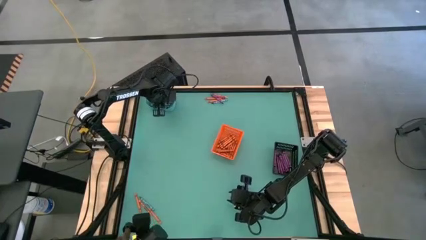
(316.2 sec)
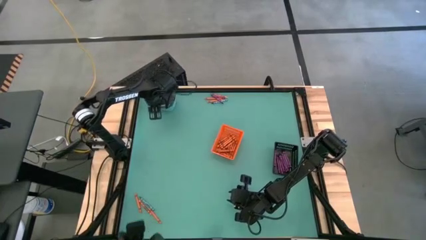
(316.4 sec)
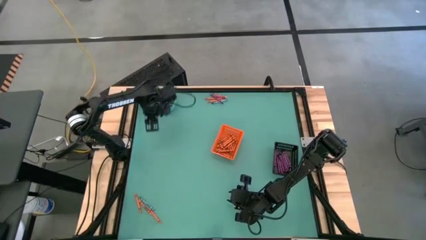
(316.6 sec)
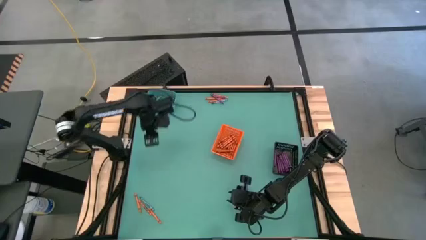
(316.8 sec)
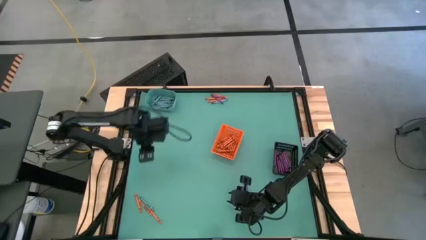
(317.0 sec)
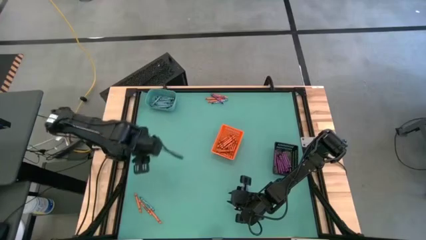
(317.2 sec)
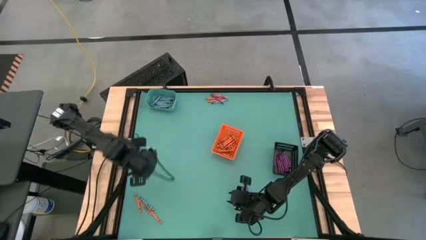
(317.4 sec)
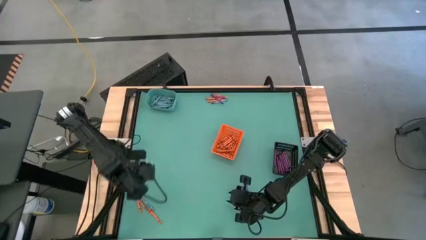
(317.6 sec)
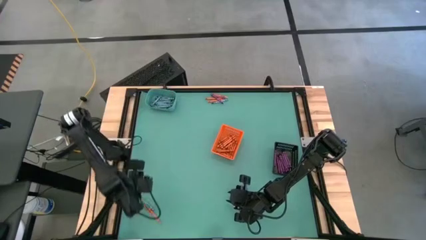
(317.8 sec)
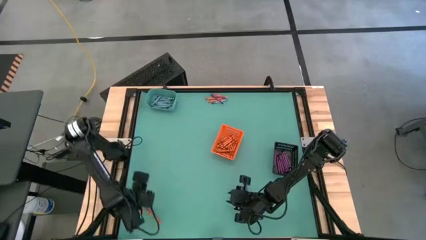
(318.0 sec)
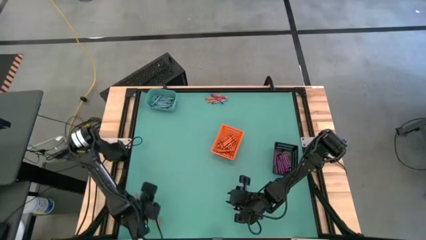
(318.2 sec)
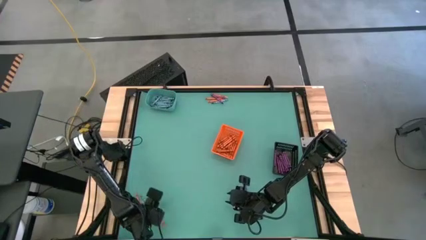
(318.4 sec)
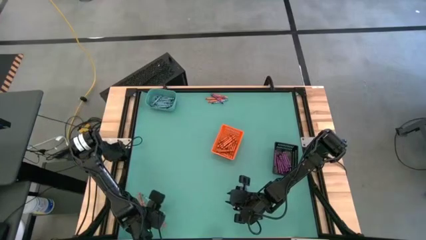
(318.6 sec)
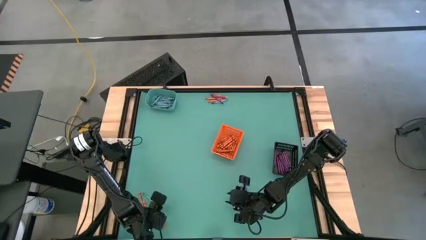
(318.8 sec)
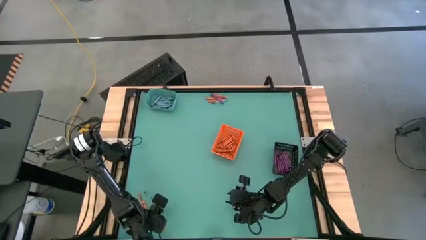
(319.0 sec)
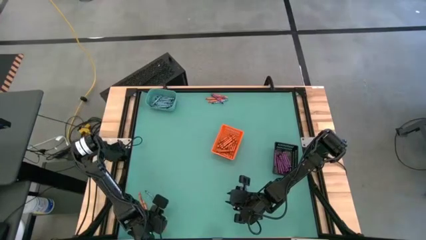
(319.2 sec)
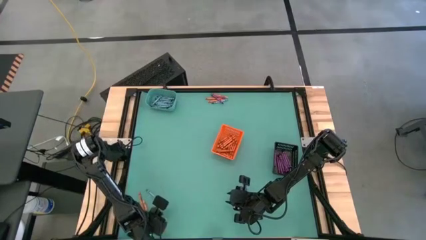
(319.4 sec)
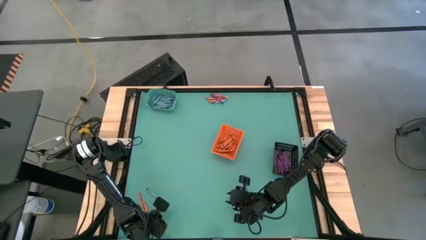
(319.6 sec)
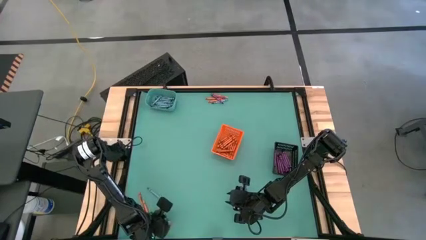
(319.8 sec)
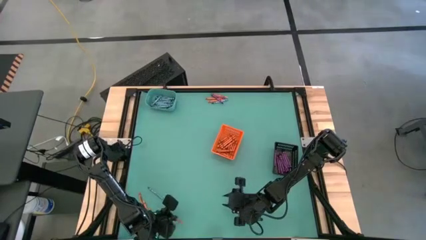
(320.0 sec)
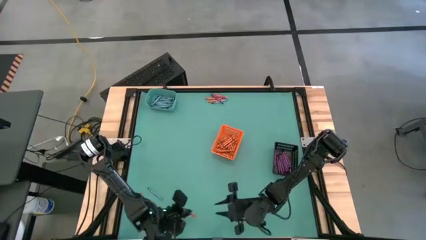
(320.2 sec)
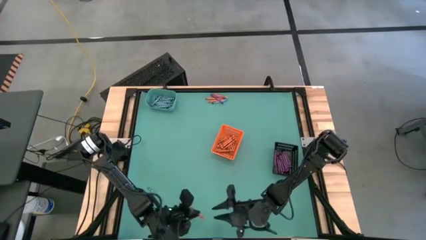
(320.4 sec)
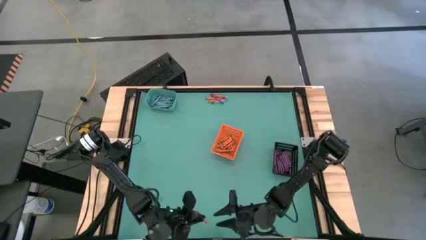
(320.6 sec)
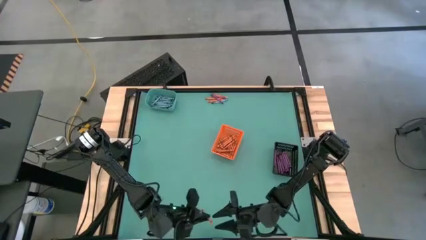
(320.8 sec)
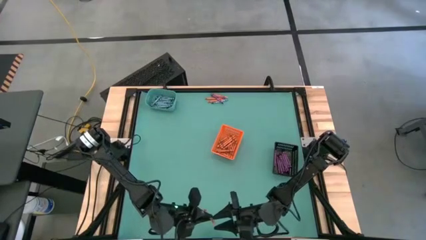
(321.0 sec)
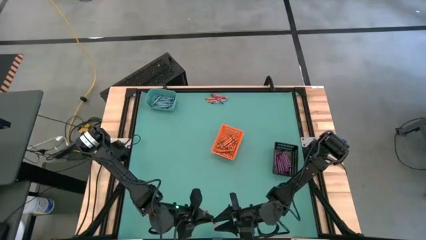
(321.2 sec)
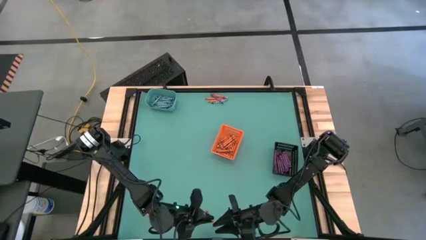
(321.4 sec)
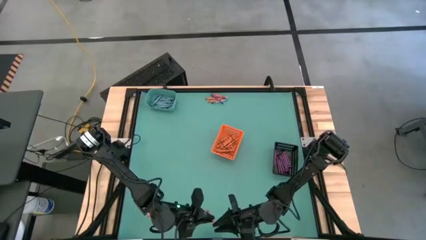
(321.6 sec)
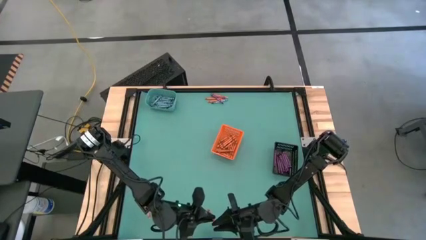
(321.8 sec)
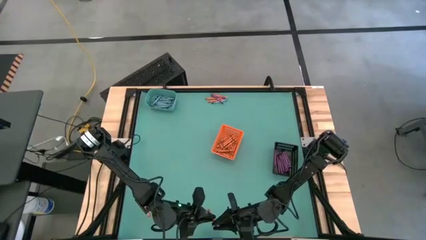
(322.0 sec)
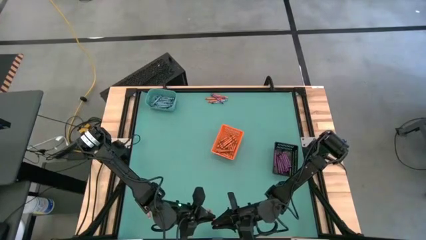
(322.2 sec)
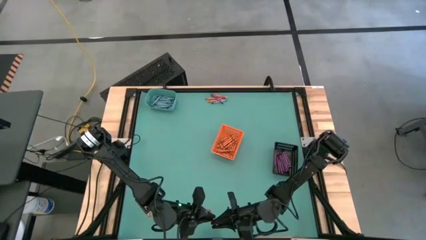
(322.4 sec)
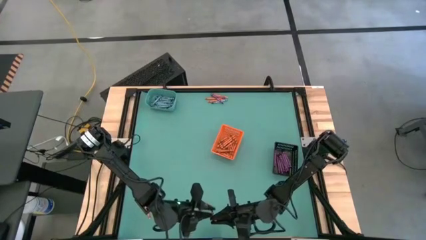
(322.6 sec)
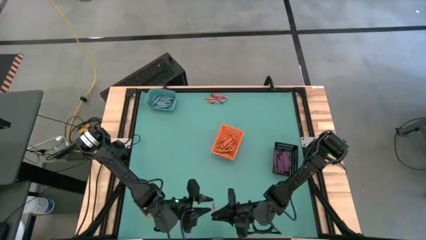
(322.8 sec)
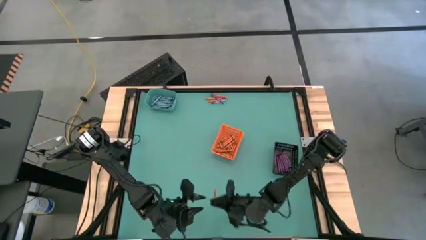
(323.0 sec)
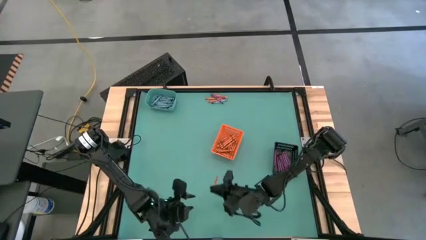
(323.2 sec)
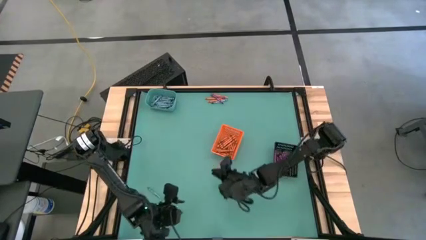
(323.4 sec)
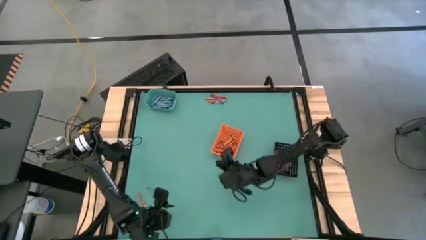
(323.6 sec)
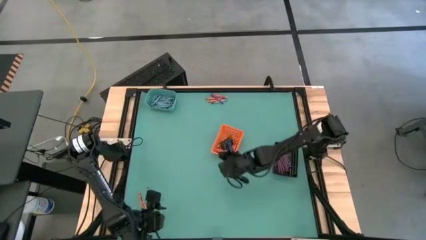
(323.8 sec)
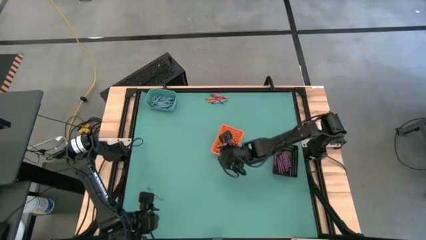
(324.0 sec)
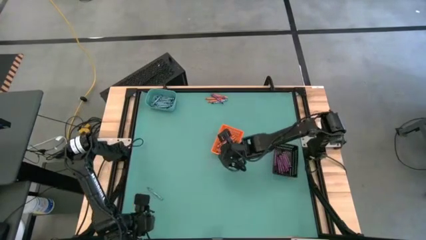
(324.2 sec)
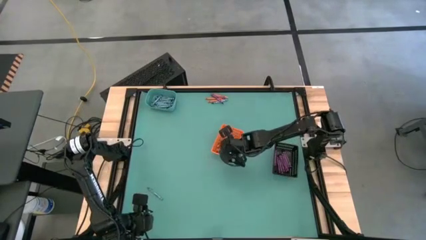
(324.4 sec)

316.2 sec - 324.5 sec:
Task: Sort crayons
Put the orange crayon into the orange bin

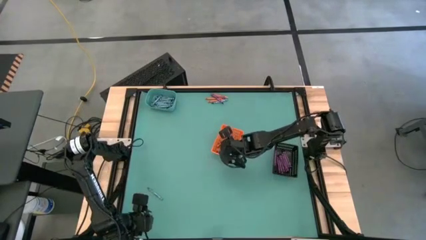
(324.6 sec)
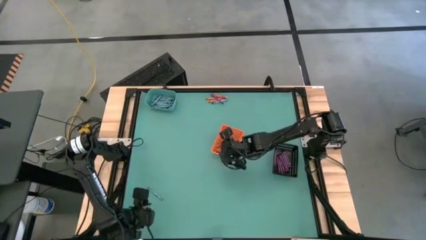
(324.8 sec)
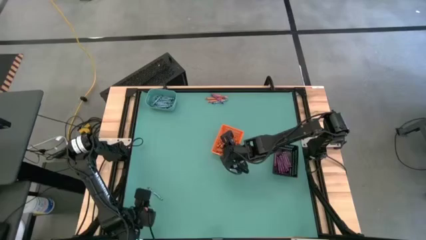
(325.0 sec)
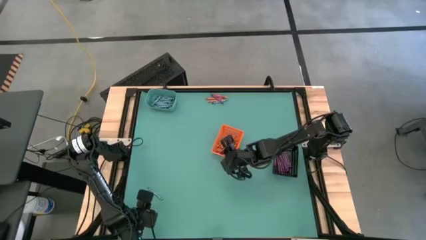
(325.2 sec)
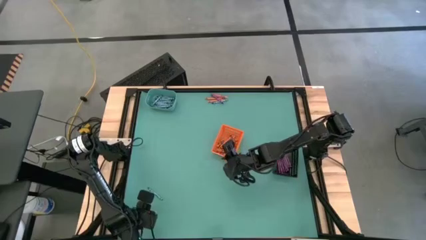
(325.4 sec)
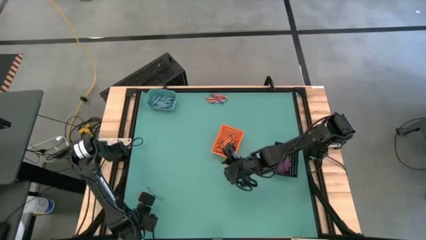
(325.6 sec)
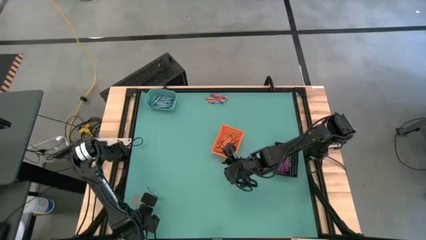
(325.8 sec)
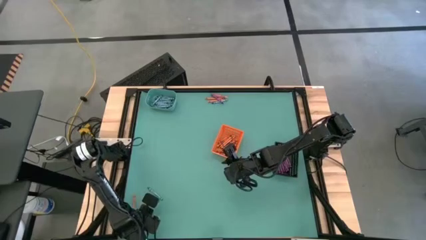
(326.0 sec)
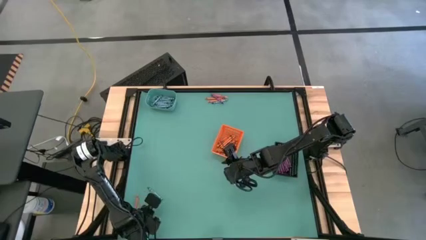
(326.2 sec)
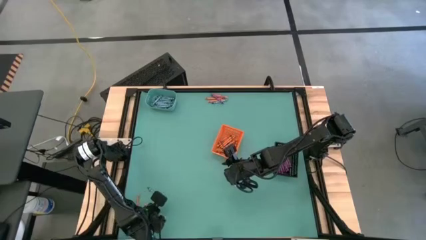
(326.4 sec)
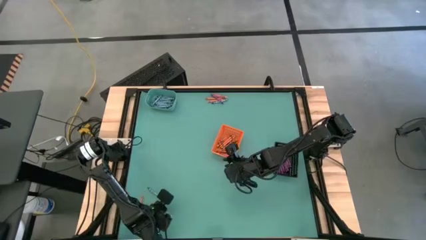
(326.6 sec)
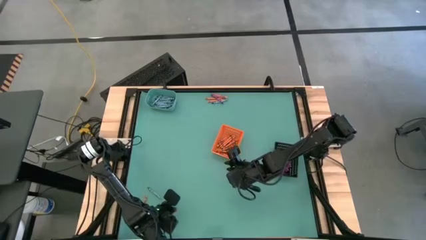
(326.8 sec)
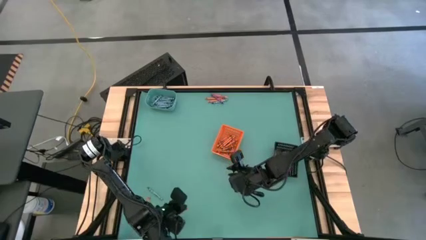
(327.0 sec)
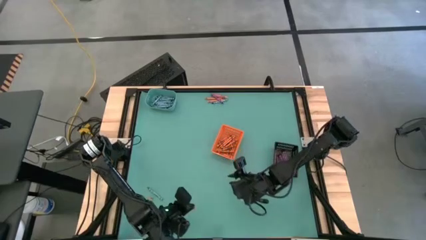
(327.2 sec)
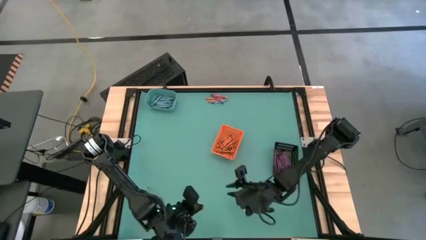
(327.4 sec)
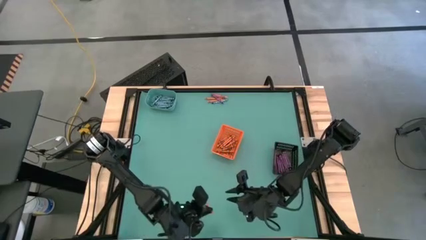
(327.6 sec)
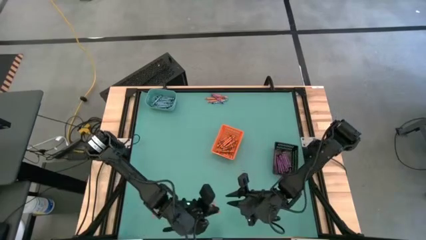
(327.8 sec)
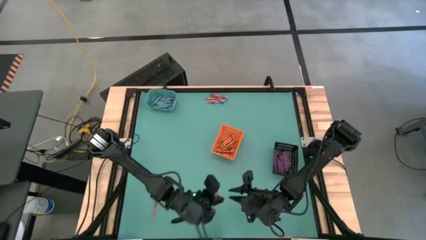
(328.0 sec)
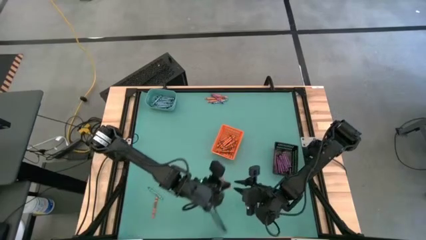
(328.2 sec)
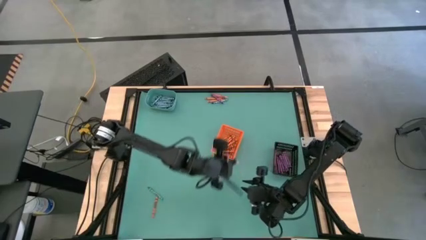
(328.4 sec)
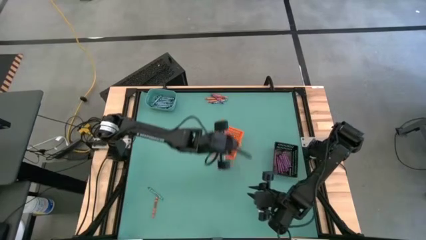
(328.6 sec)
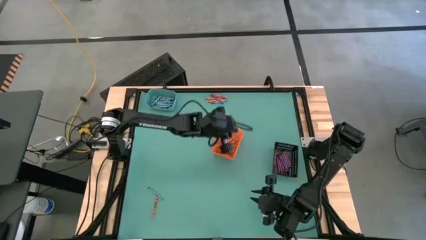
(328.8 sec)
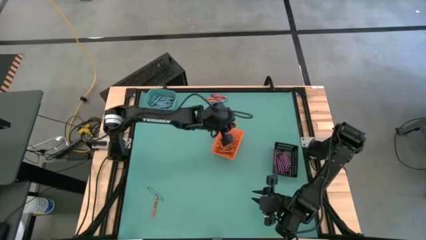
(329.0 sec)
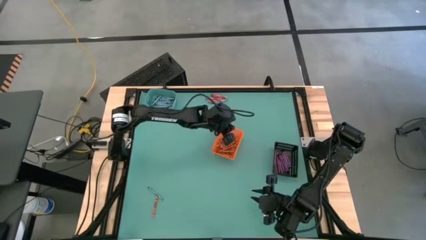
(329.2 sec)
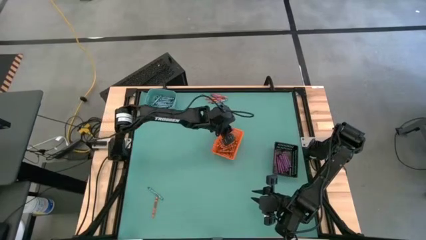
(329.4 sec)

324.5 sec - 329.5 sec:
Put the orange crayon into the orange bin

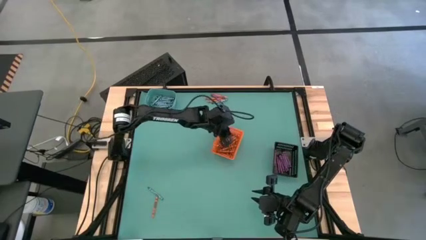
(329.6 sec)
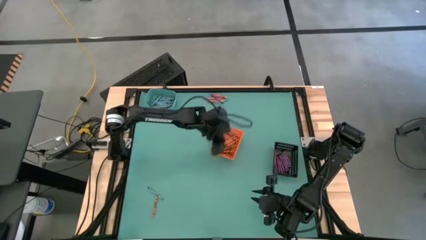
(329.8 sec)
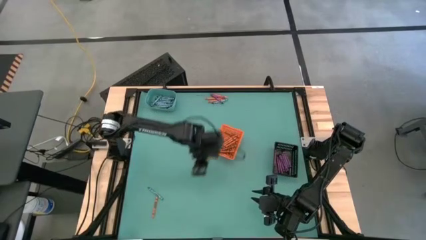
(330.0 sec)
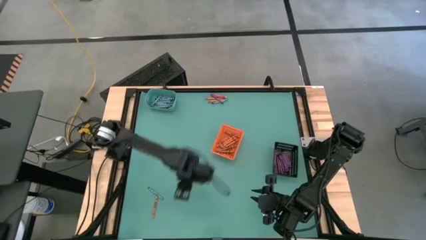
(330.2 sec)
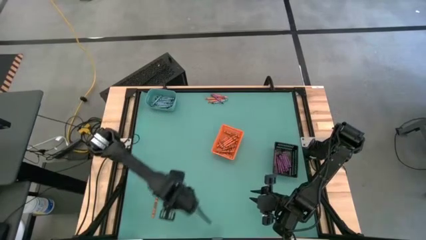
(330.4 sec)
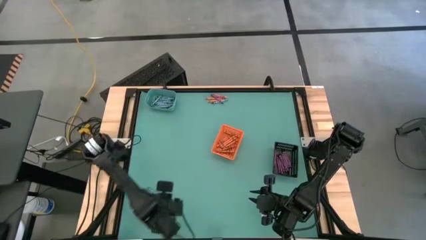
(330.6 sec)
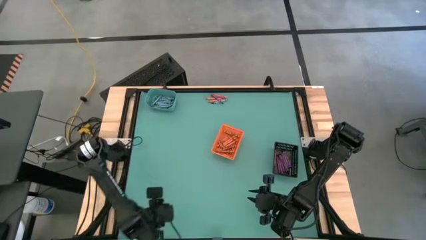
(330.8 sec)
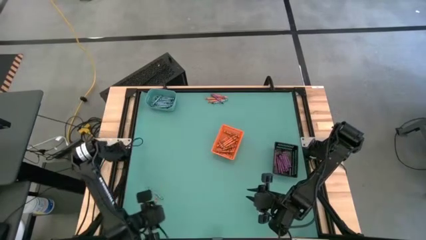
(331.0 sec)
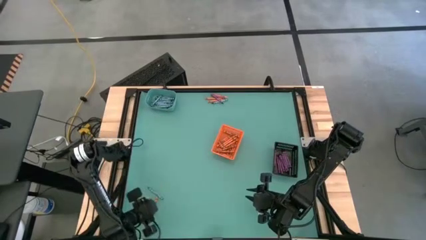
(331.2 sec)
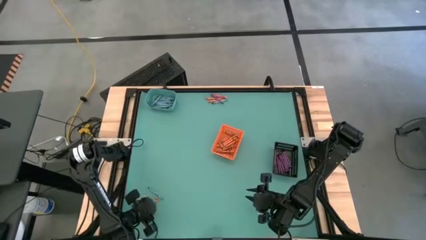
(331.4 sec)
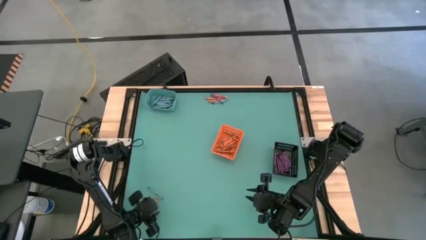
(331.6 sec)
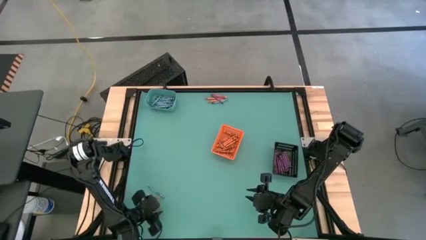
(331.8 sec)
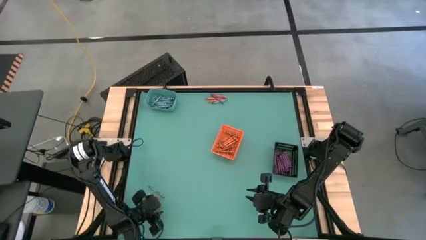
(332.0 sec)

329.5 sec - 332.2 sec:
Put the orange crayon into the orange bin
